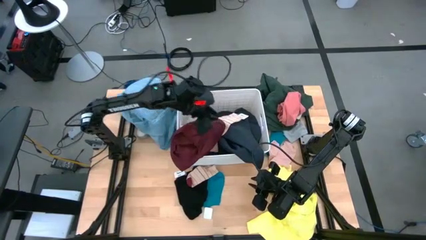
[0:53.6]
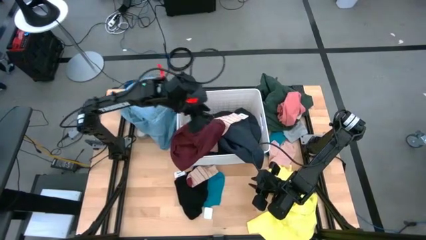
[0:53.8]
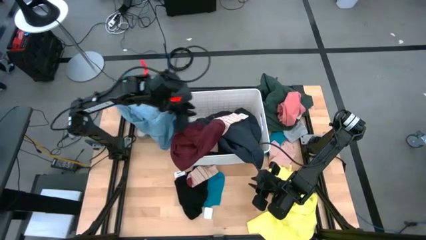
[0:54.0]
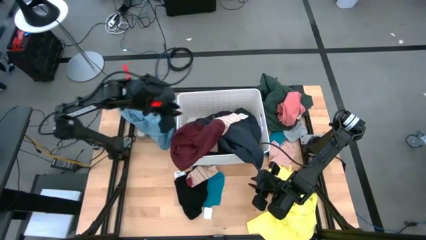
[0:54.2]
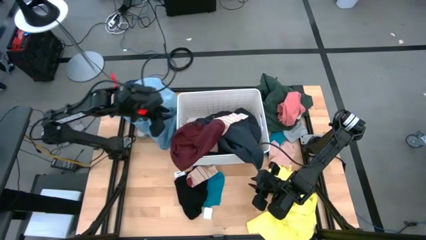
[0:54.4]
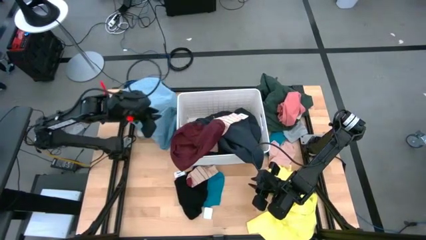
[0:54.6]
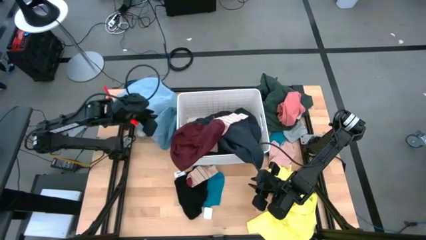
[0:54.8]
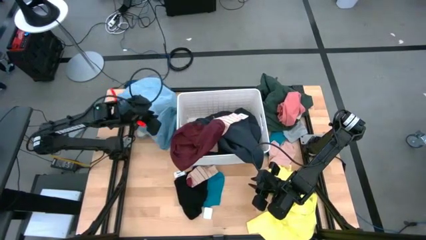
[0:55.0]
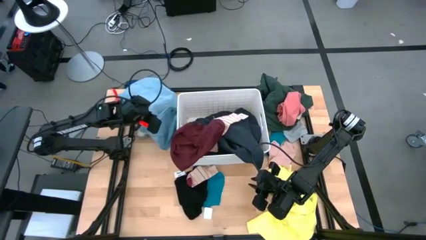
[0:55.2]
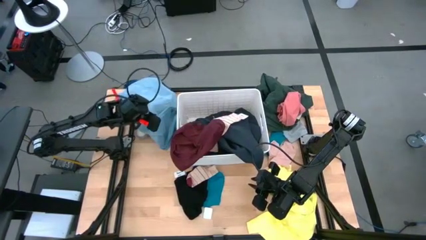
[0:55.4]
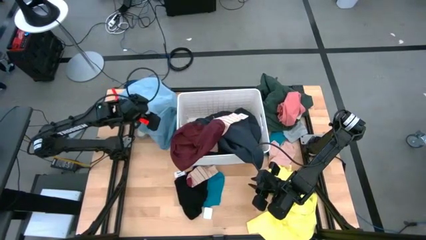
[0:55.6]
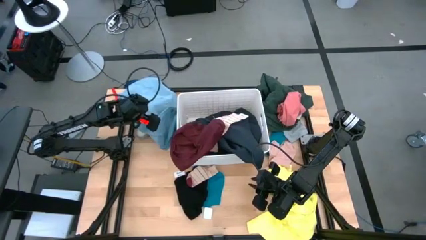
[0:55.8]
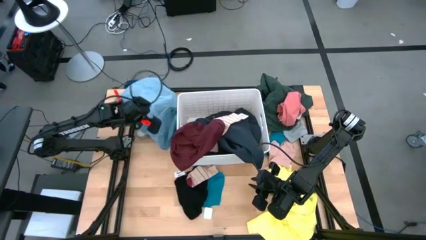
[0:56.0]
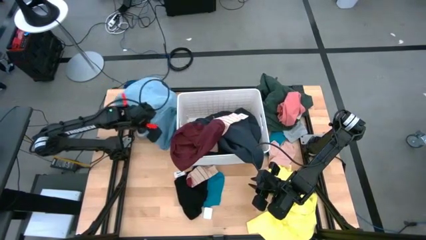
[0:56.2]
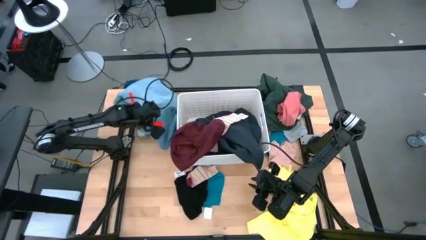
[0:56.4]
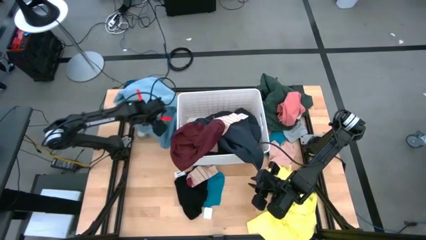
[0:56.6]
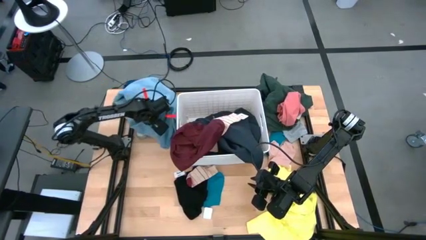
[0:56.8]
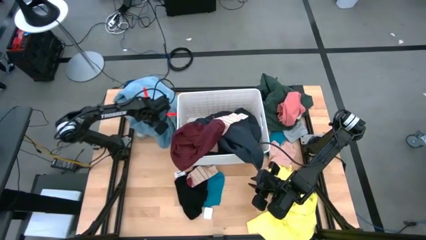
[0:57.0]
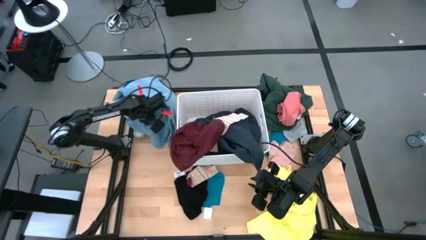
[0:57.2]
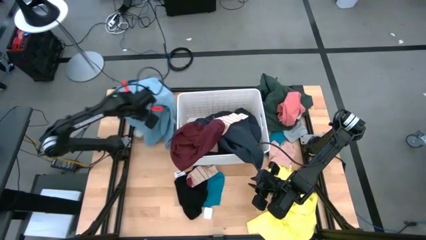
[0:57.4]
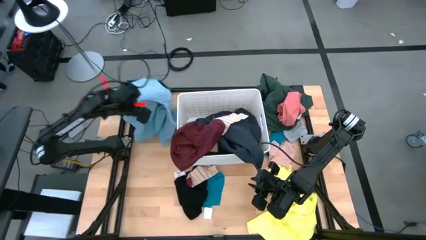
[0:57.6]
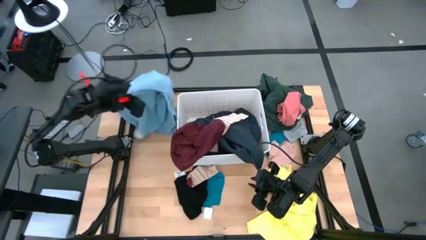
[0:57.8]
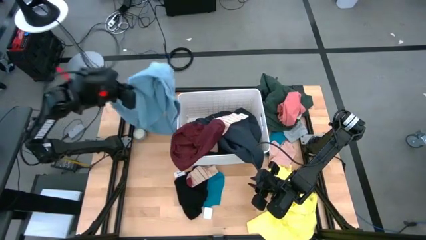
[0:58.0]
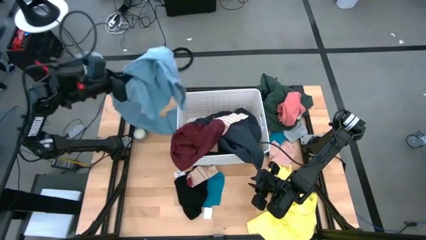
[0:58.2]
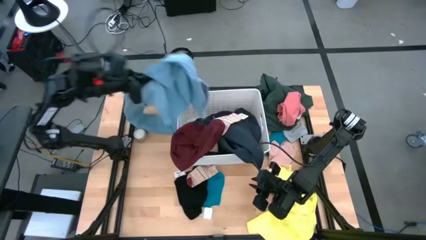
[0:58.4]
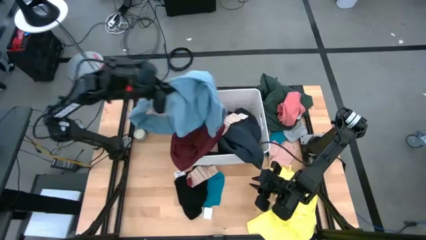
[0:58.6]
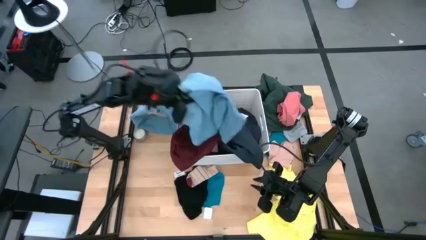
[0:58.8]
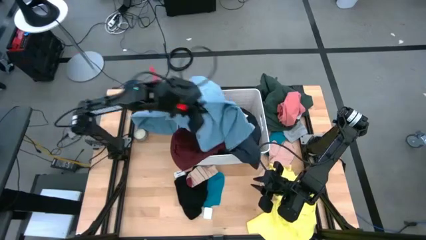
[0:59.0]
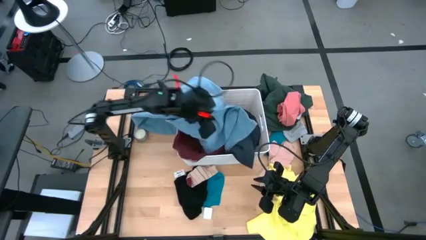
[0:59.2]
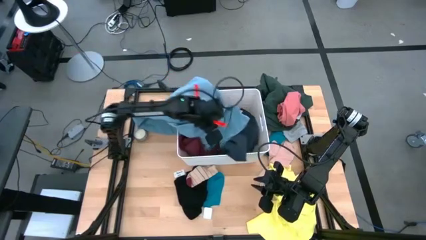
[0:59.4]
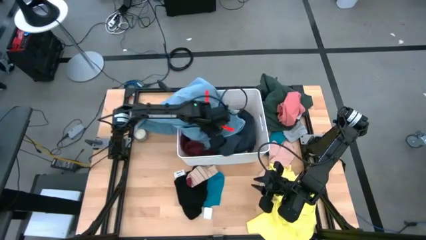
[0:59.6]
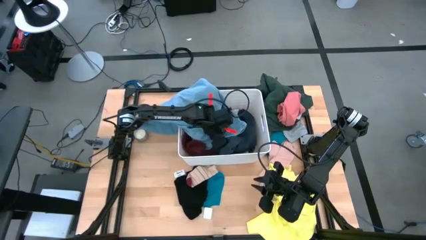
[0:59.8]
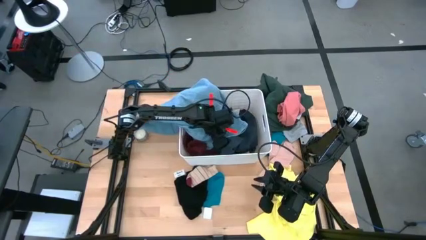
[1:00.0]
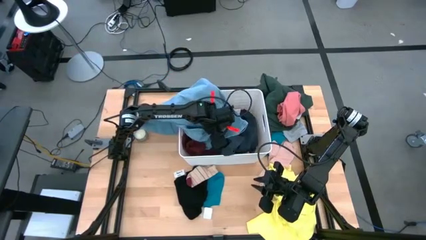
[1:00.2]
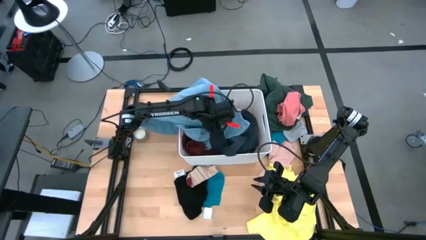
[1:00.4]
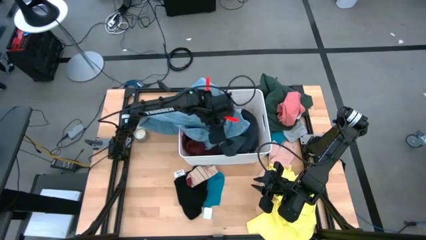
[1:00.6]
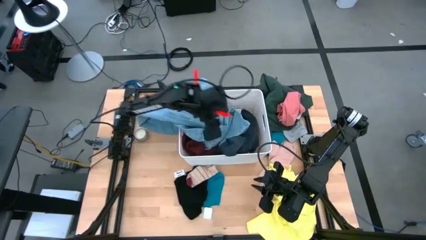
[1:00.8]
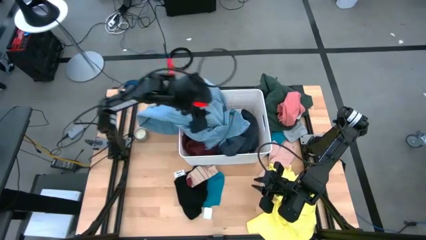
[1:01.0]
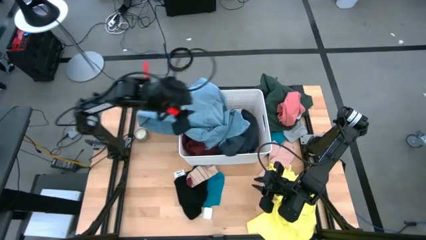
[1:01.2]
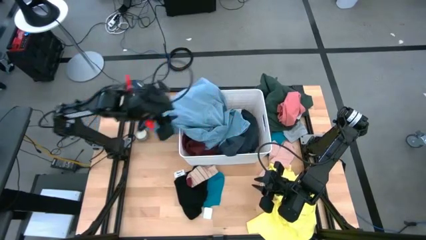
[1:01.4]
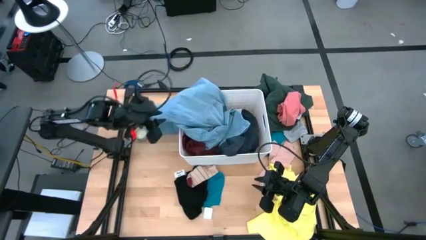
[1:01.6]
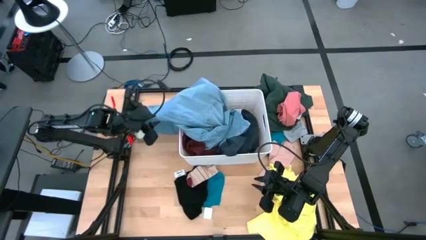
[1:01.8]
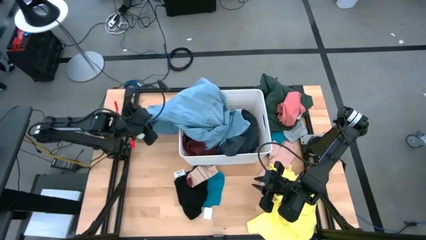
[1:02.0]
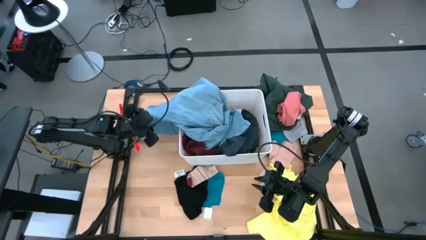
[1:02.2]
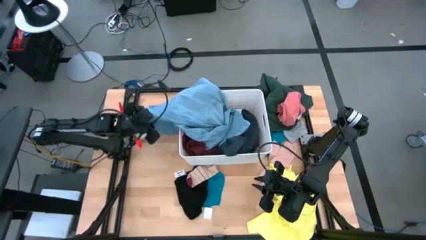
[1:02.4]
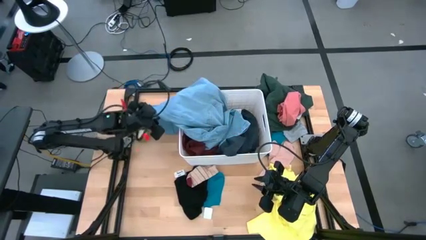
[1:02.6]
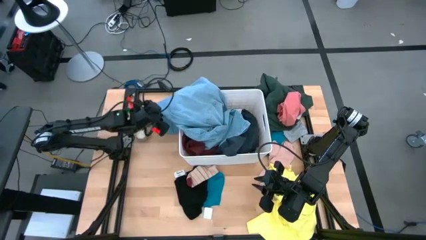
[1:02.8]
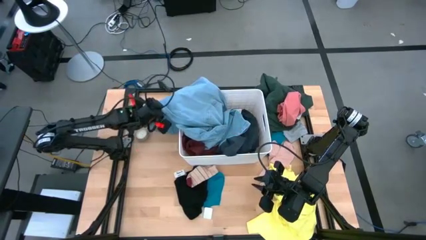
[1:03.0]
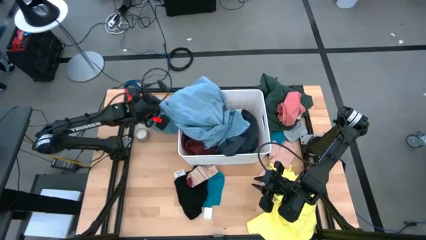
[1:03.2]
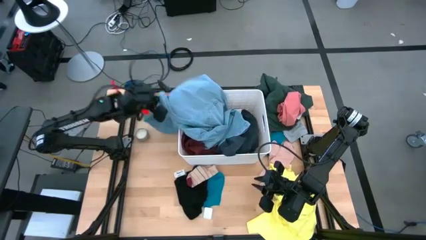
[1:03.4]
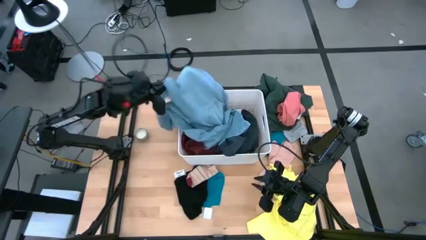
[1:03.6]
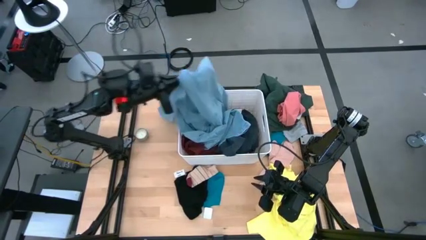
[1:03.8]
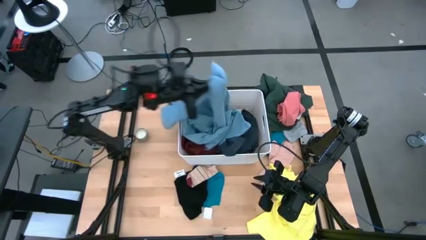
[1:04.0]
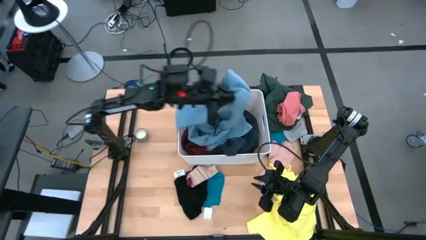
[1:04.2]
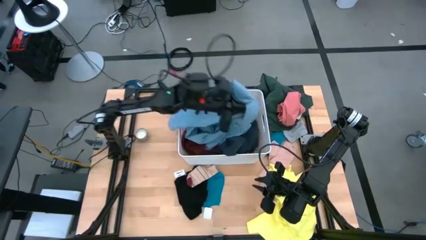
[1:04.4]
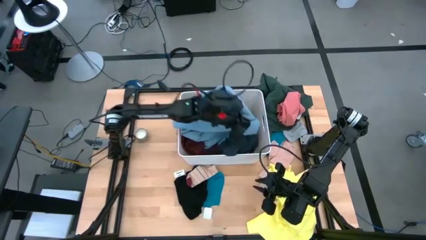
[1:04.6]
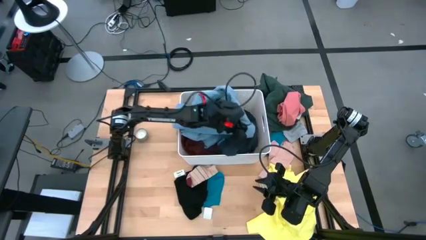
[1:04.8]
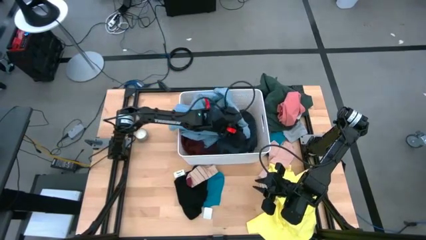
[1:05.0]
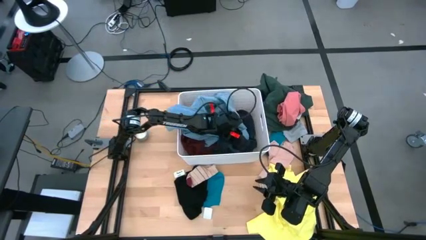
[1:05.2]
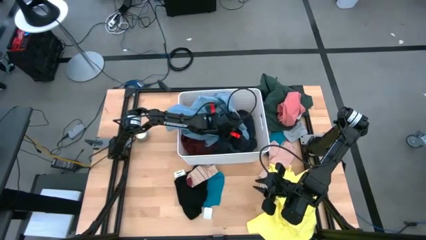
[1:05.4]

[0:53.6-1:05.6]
Task: Sort clothes
Put the blue pants into the laundry bin

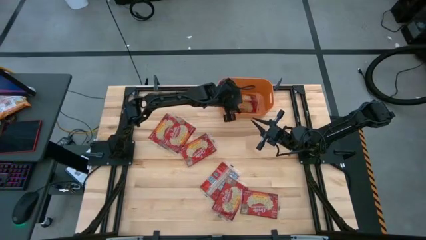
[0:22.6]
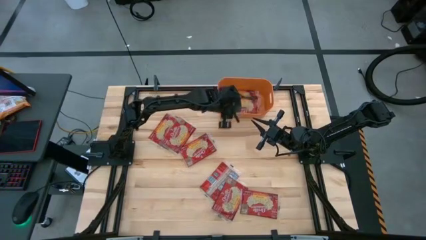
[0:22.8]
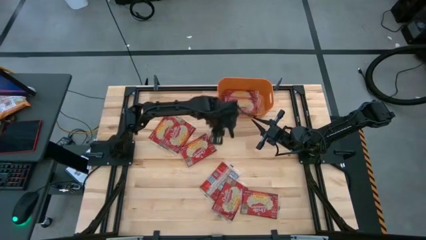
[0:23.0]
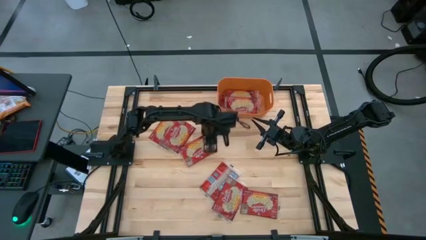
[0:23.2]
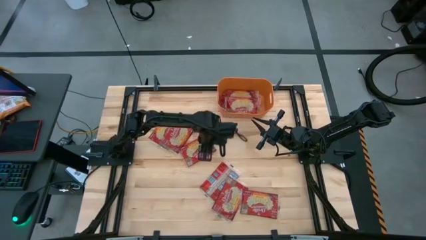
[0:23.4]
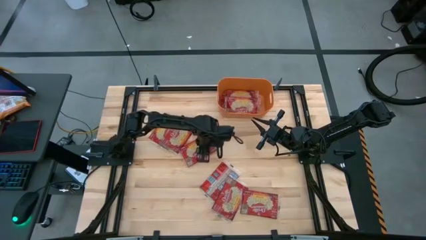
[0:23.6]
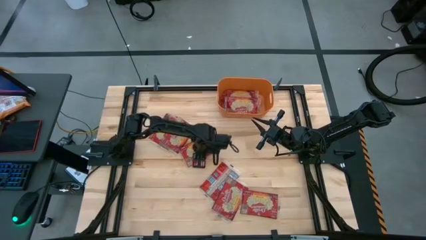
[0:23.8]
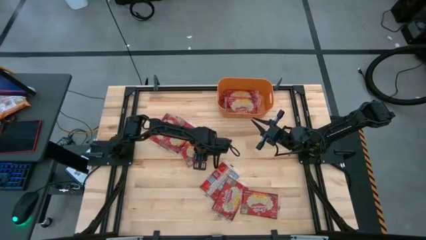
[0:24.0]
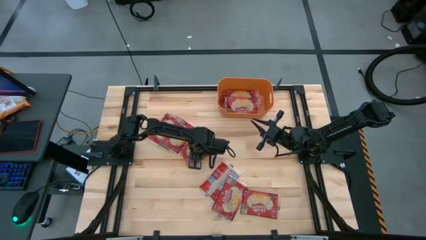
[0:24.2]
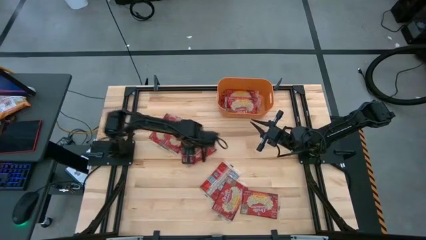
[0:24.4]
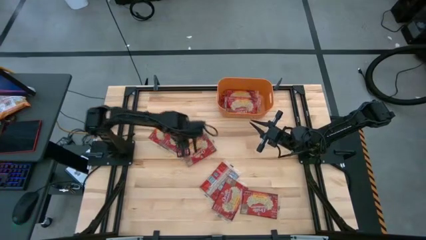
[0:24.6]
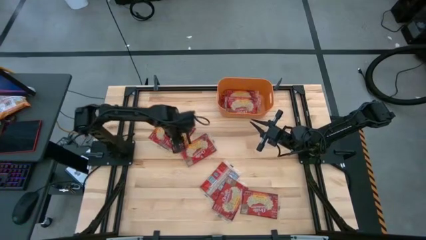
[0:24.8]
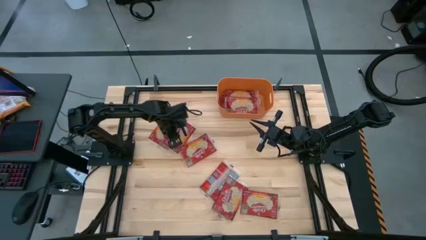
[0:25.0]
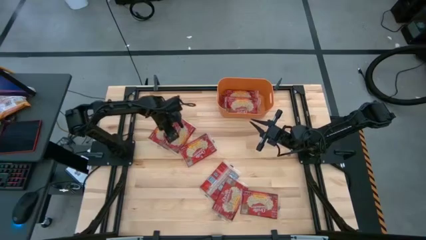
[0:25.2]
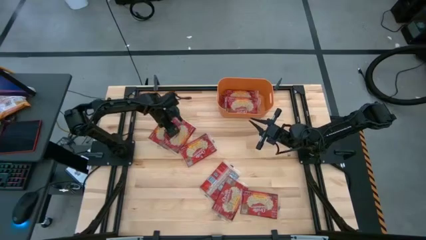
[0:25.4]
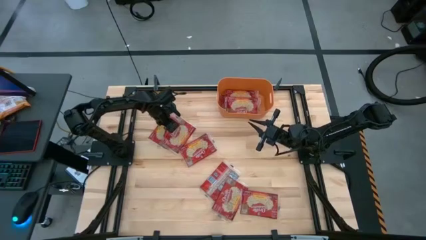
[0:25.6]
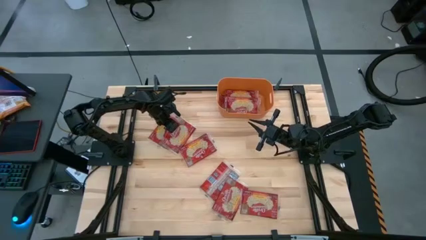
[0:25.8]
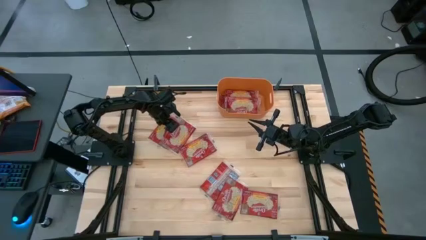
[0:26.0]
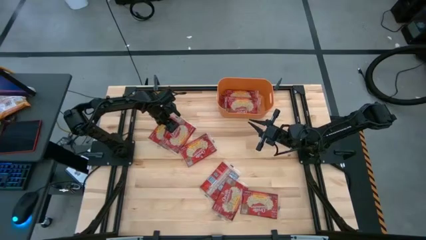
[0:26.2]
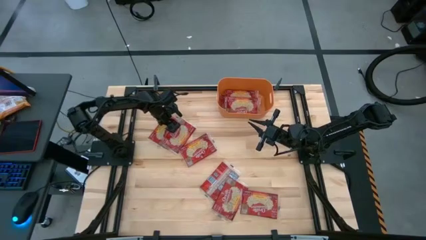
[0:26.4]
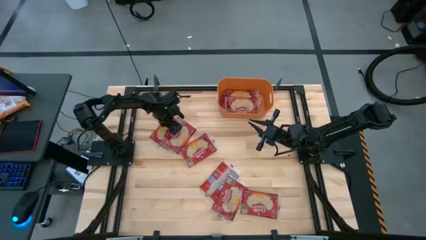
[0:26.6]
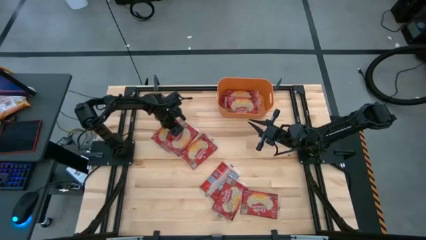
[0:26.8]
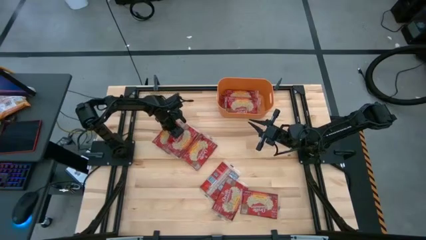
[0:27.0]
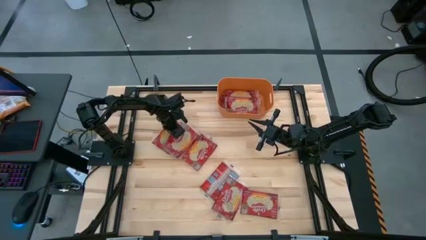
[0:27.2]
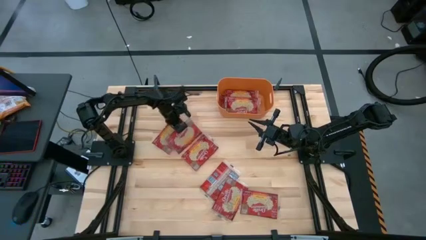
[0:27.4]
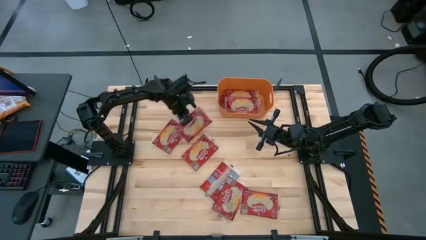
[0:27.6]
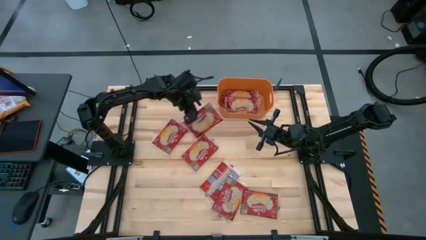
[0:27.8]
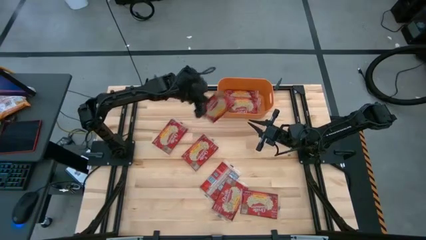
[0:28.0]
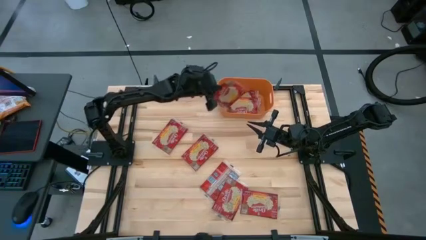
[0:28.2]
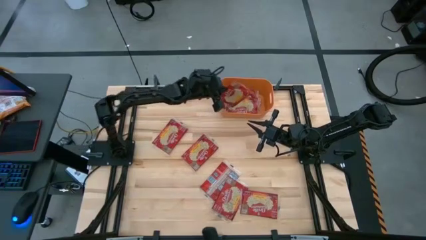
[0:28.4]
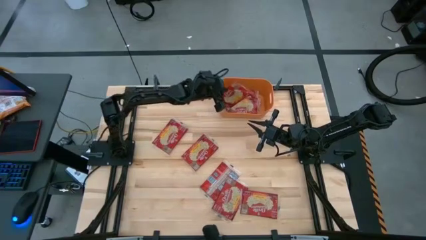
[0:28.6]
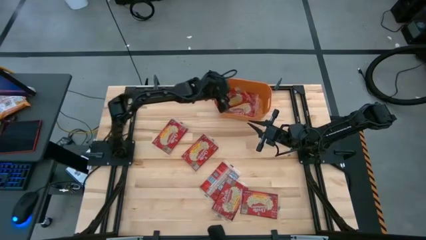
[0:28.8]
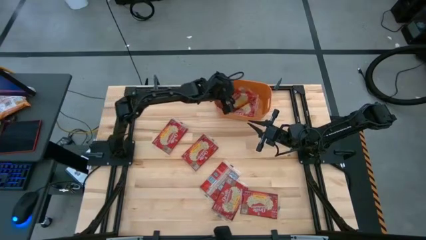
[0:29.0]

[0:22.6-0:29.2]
Task: Sort popcorn bags into baskets
Put the popcorn bag into the bin
